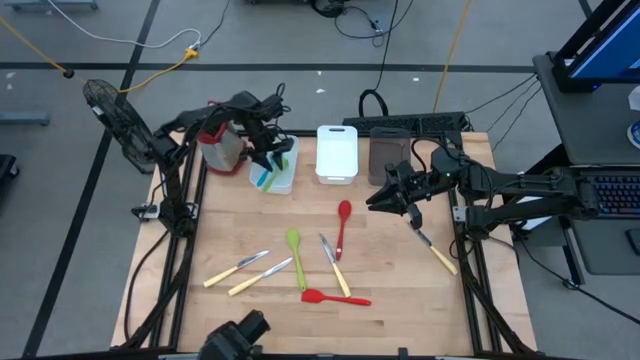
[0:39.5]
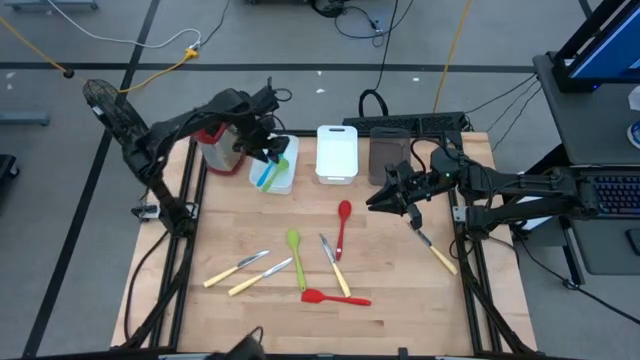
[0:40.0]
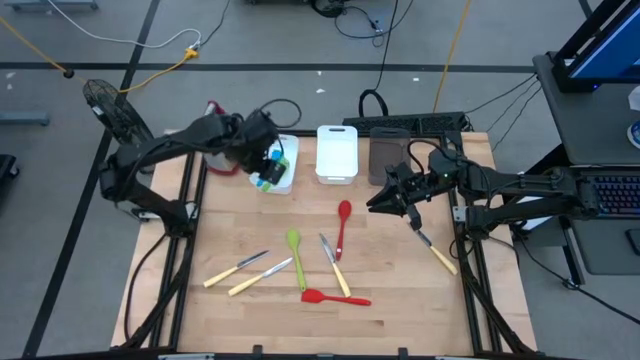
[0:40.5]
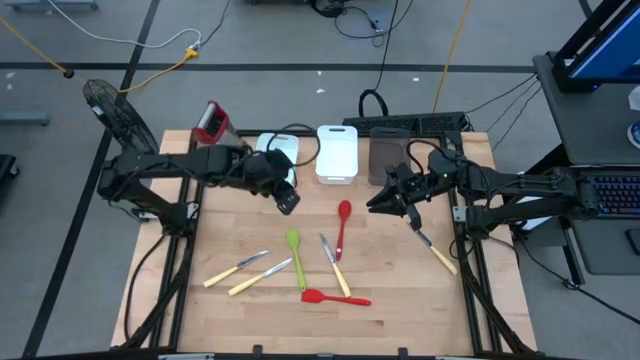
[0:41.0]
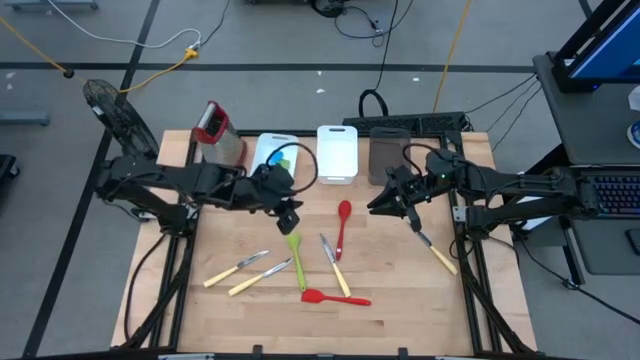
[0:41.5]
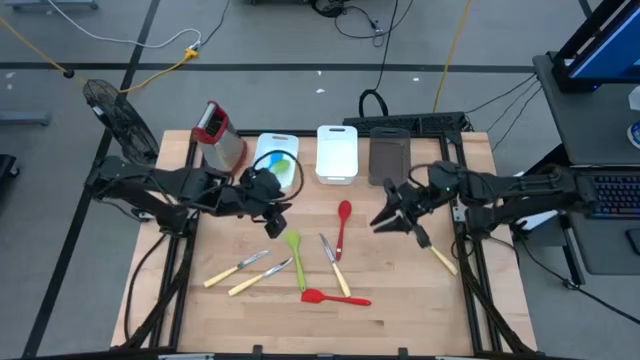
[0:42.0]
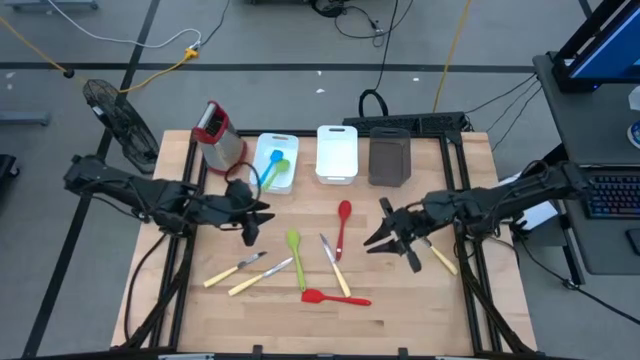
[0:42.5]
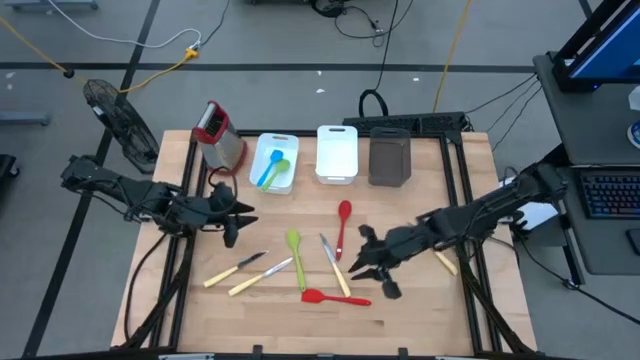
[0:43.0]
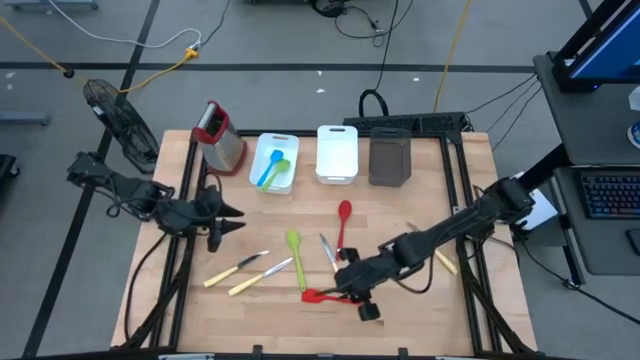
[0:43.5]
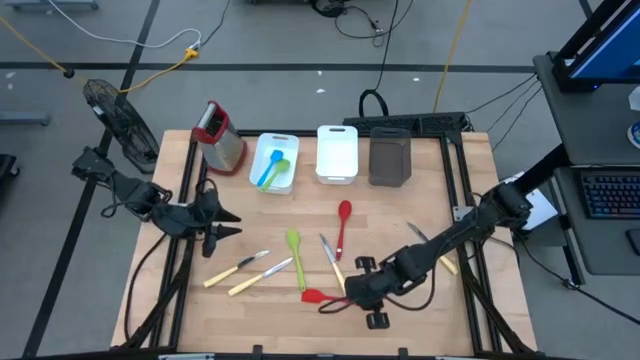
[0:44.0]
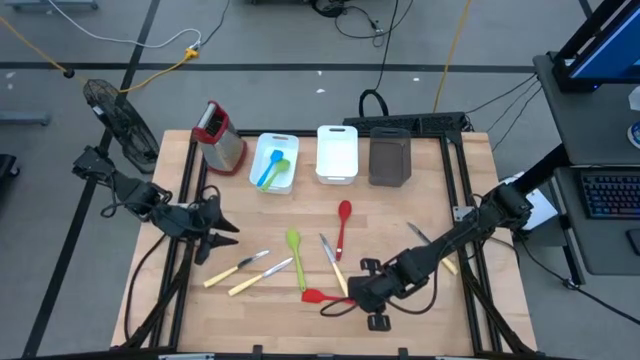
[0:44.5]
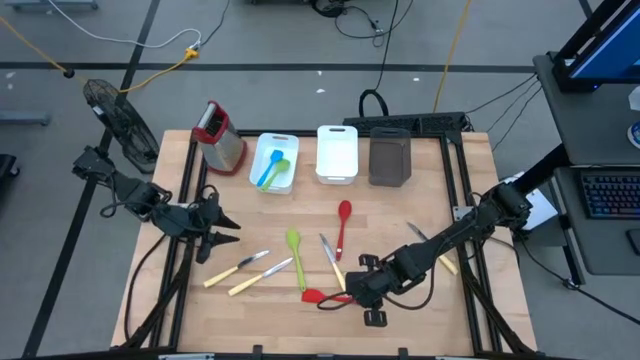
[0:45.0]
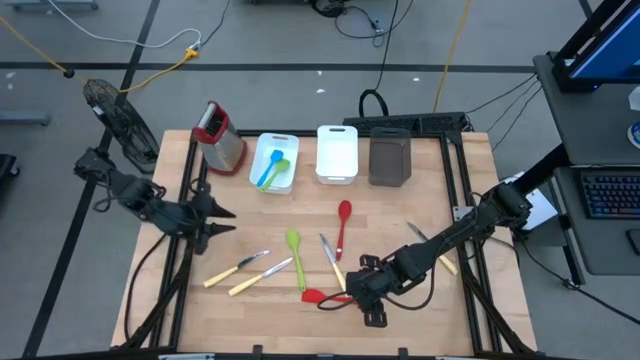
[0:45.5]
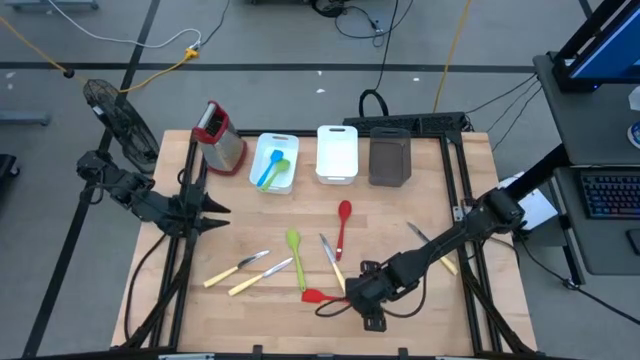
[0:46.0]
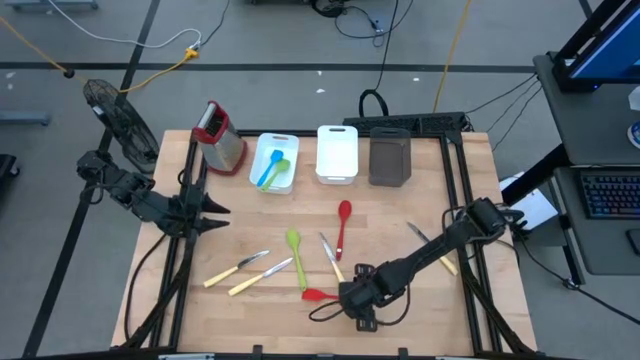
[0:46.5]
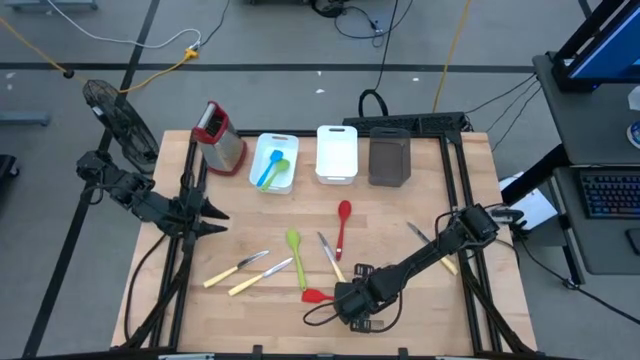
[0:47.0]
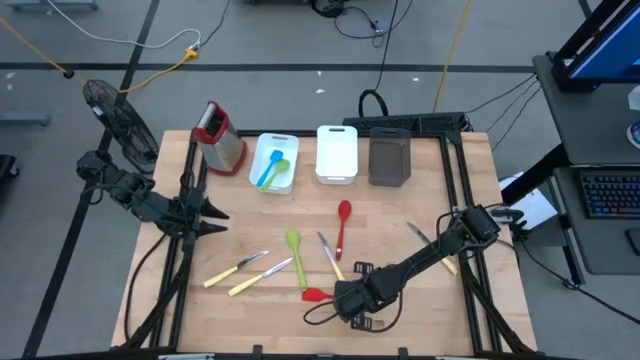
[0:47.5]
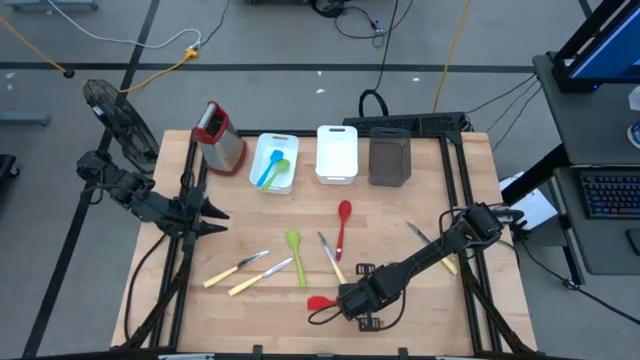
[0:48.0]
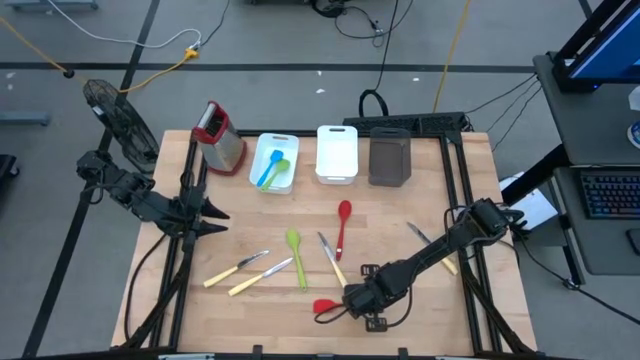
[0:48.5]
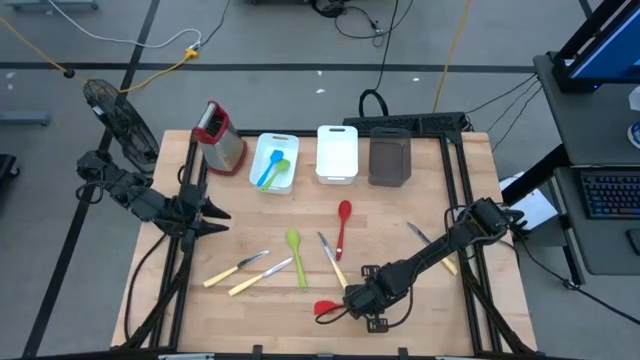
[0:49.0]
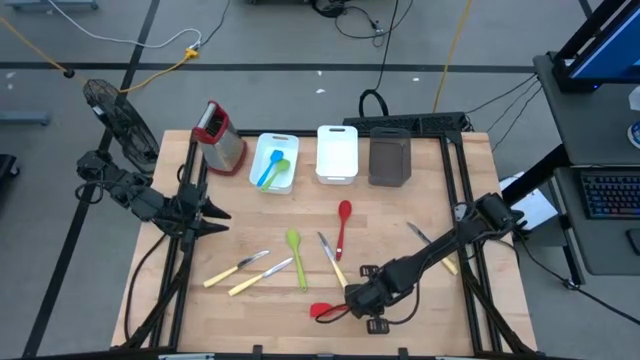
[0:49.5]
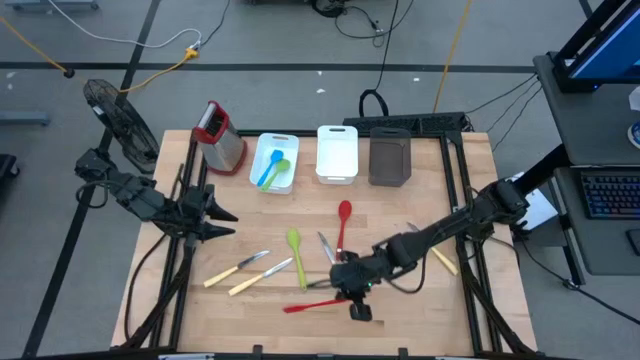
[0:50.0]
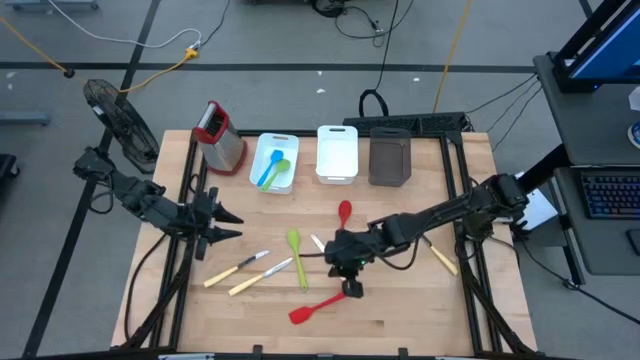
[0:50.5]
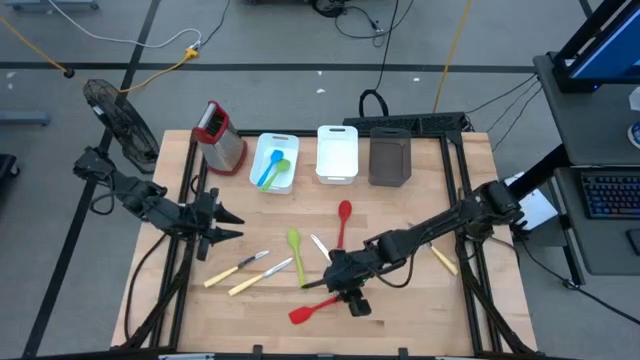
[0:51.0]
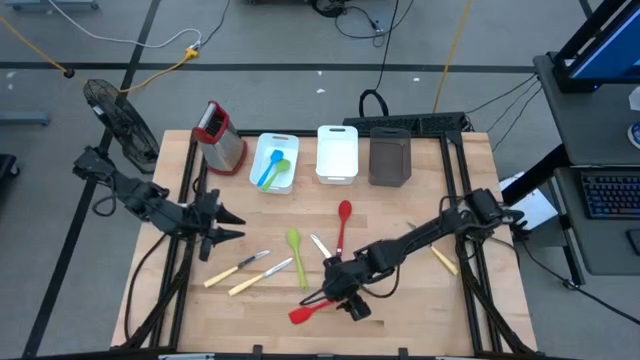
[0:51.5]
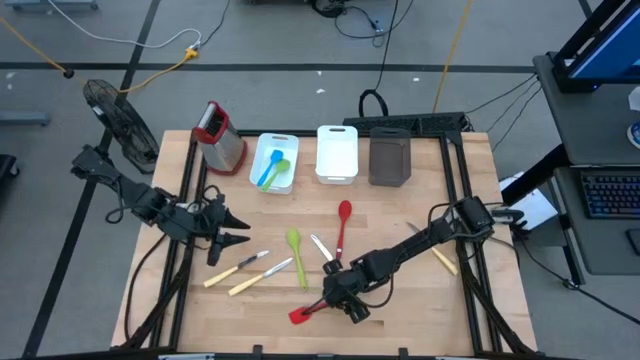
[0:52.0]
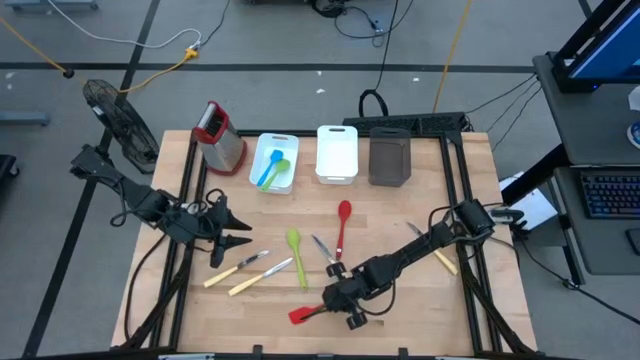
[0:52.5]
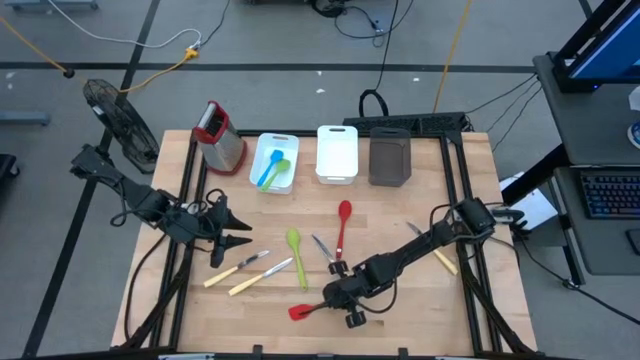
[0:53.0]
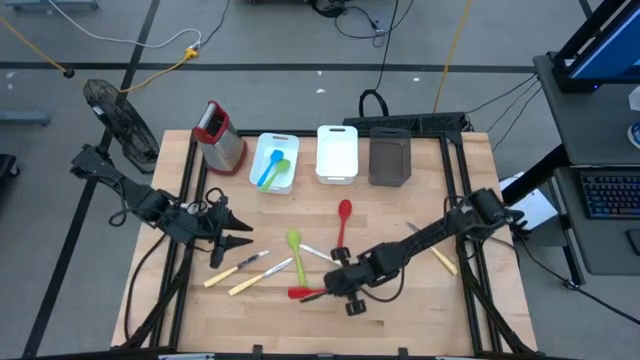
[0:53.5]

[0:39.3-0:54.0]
Task: Pick & Place Kitchen Items
Put the red spatula into the left white bin

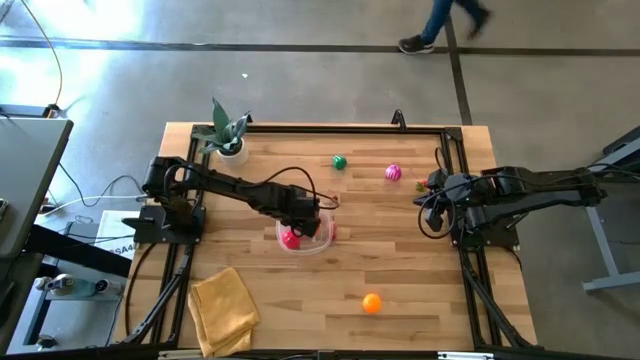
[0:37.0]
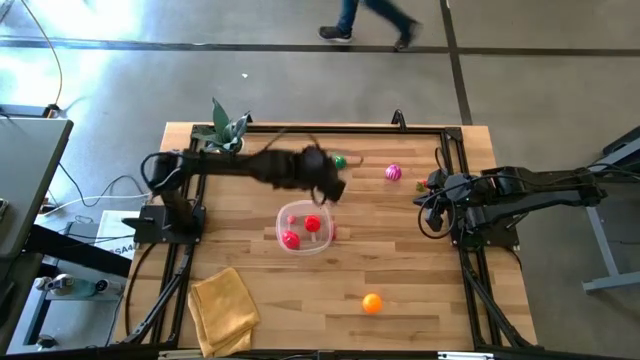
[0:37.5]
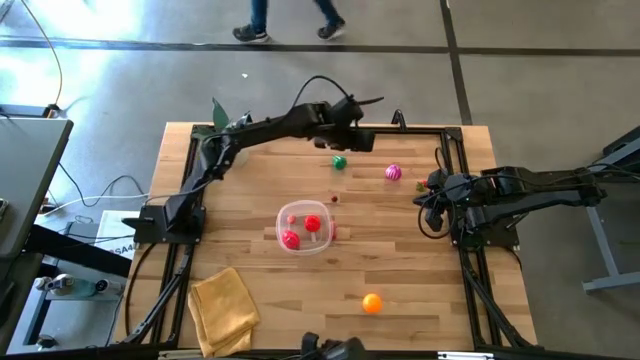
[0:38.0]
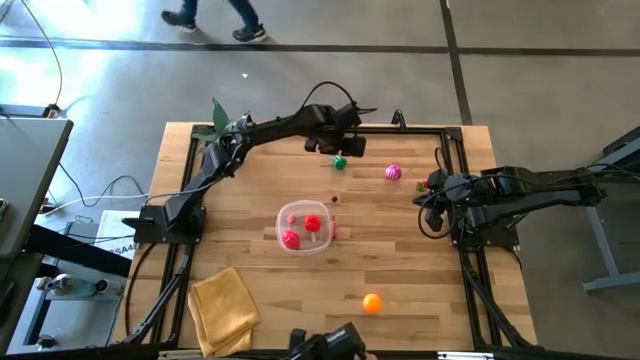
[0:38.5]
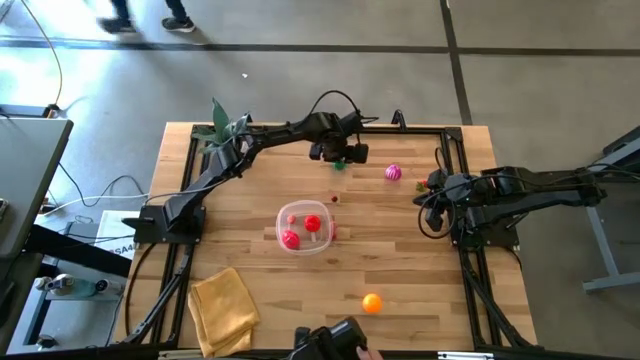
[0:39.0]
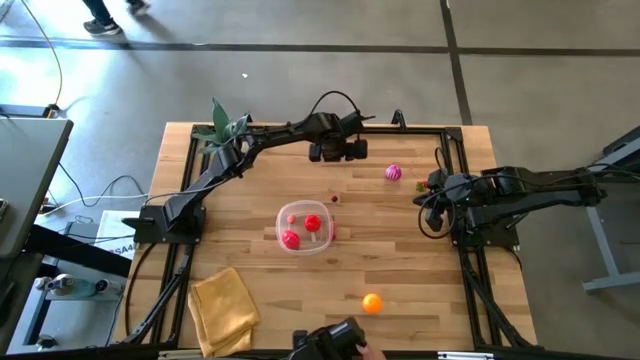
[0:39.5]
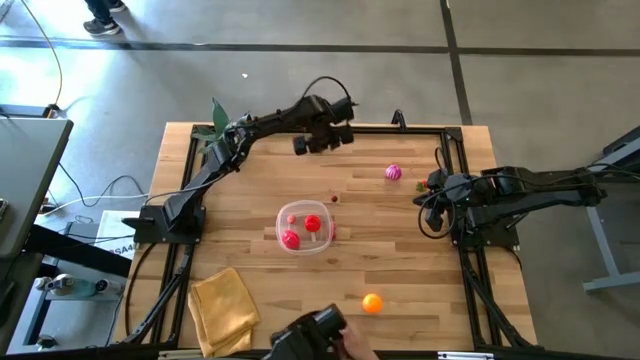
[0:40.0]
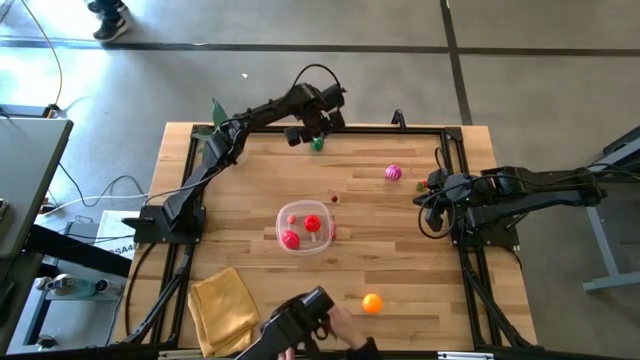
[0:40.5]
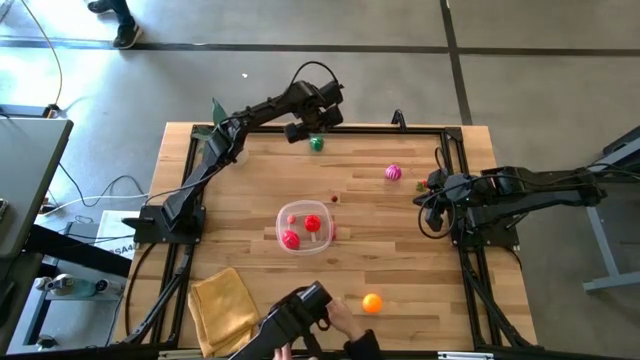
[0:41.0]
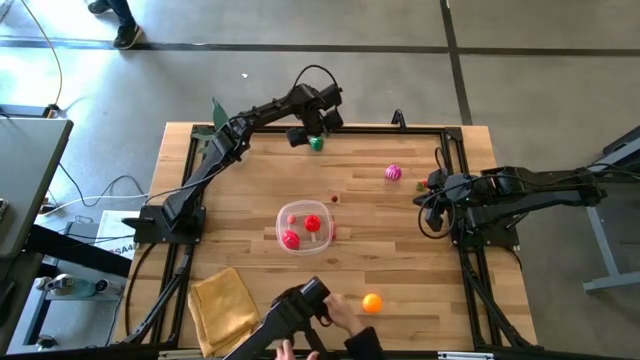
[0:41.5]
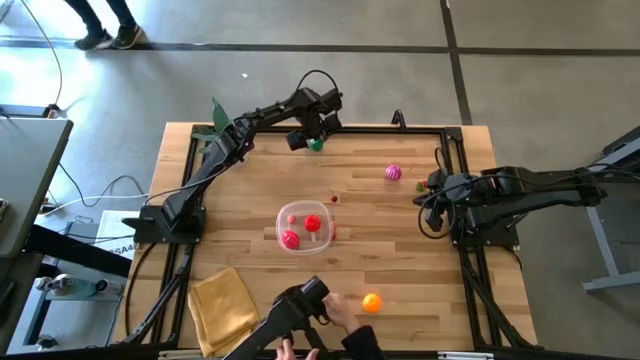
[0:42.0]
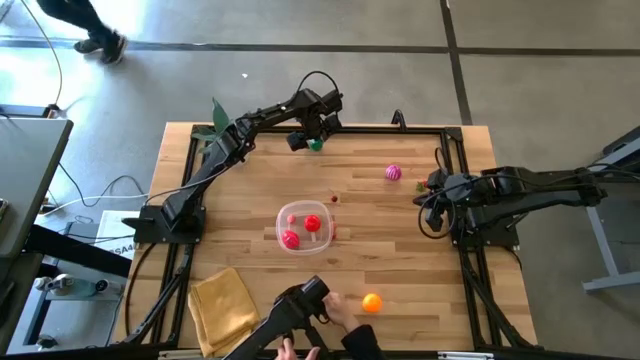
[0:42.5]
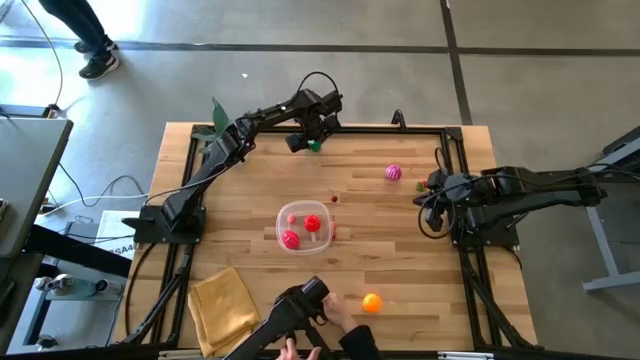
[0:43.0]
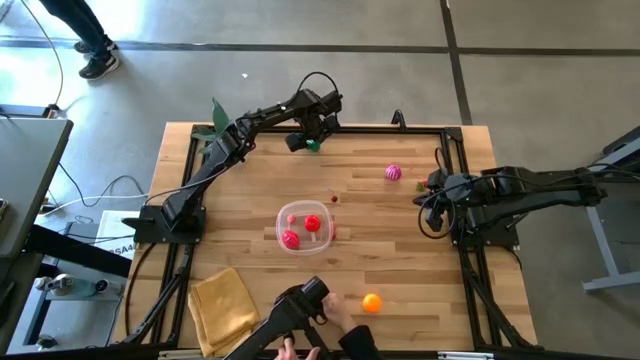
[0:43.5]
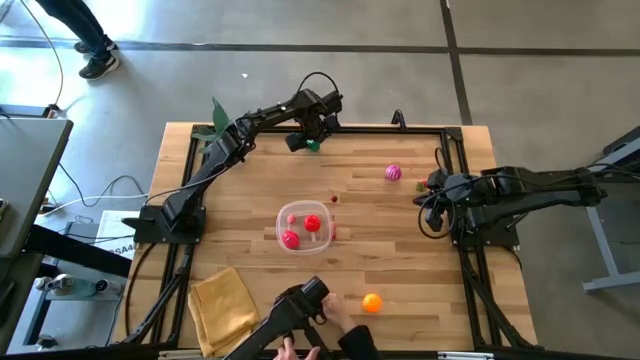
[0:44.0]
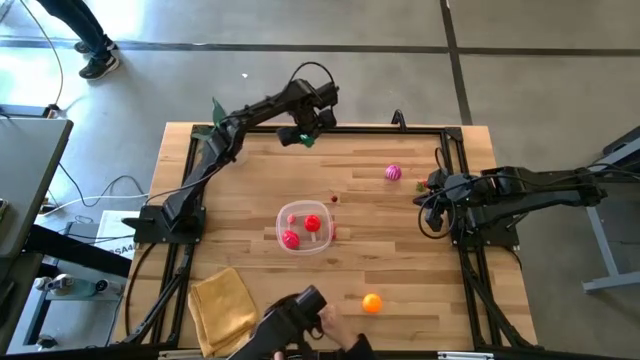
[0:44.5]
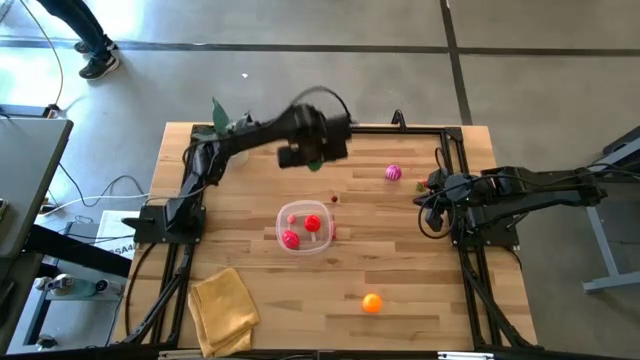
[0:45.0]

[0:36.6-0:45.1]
Task: Pick and placing Produce into tupperware
Put the green bell pepper into the transparent container
